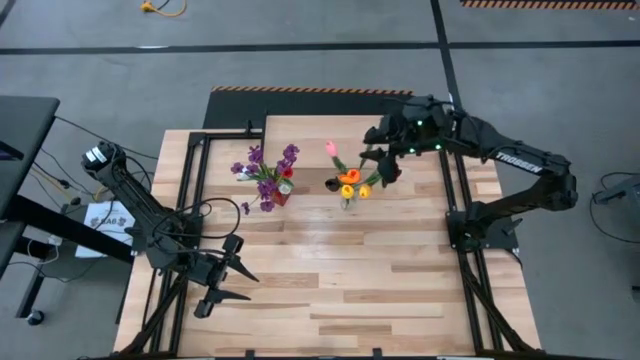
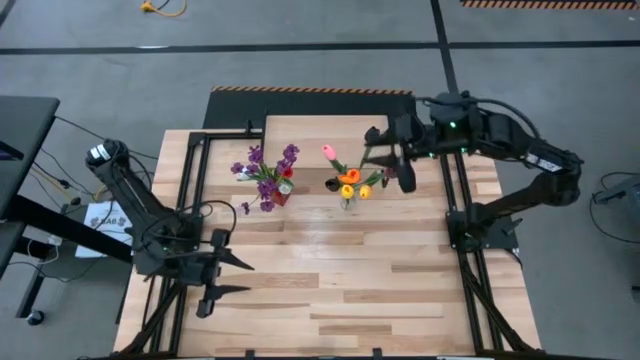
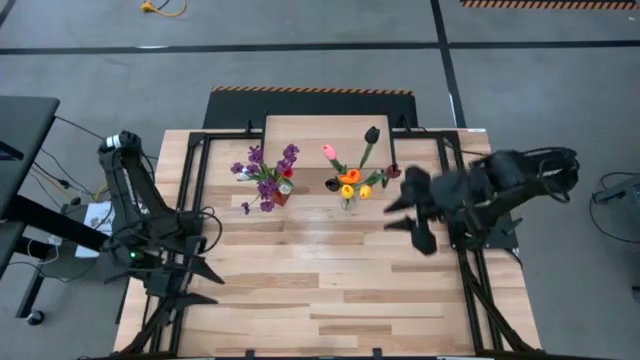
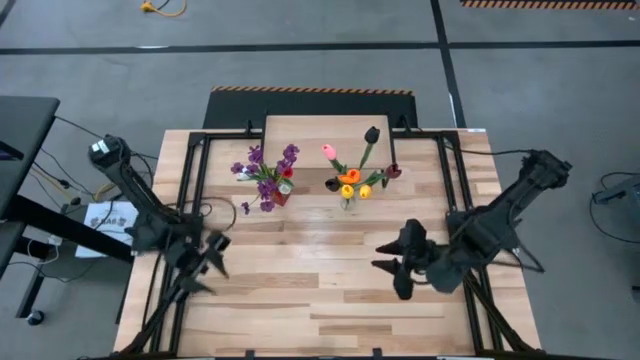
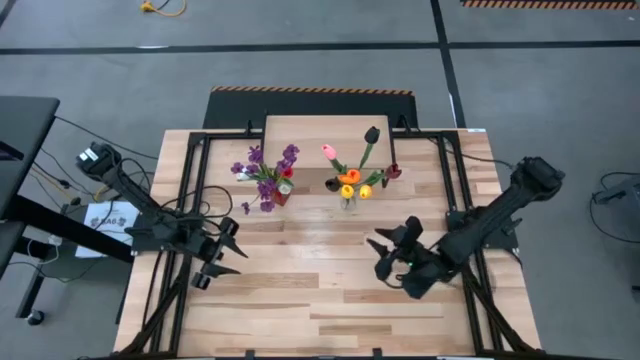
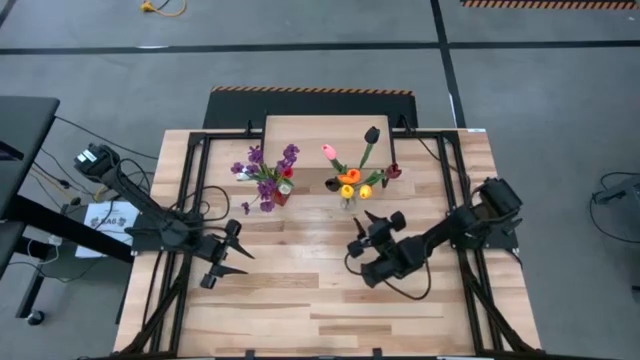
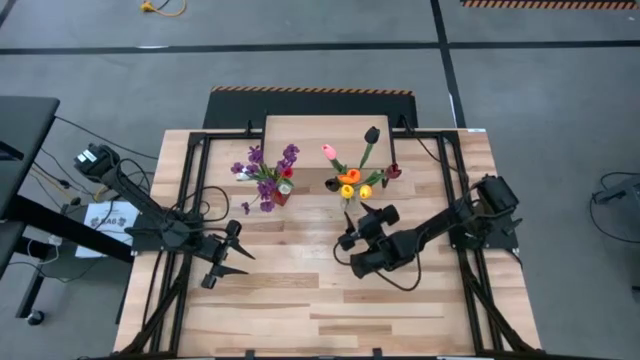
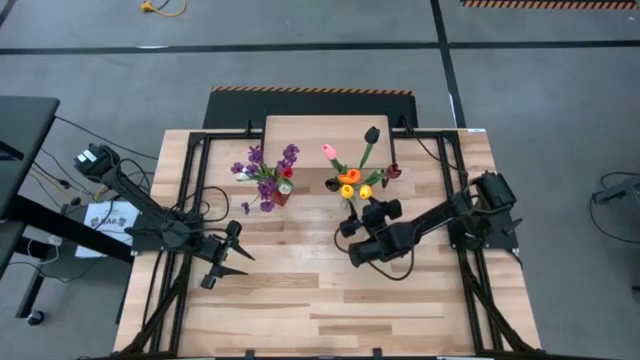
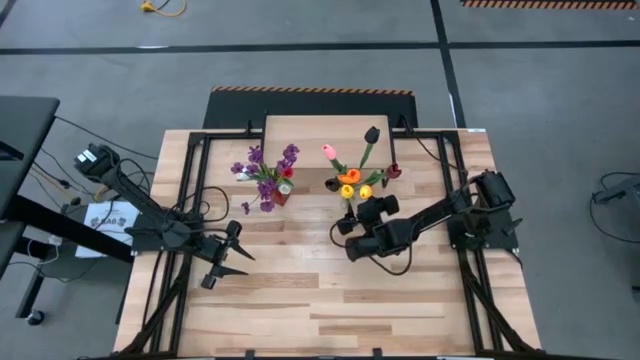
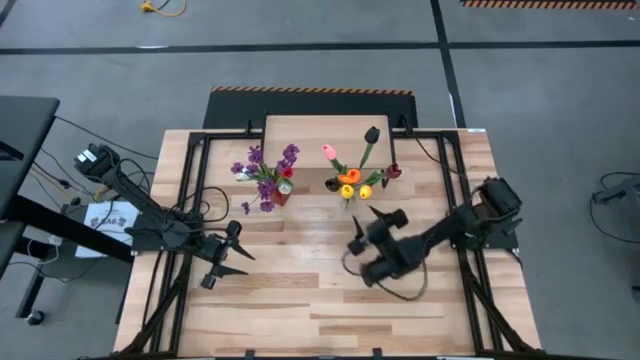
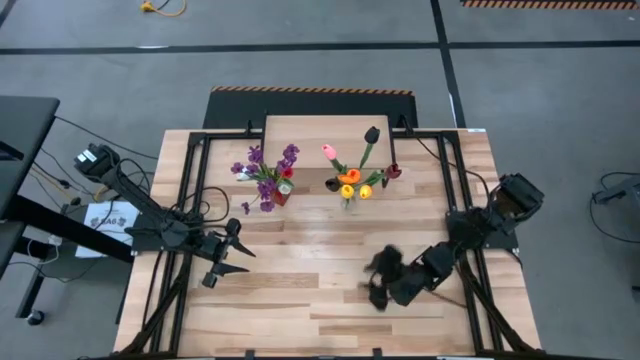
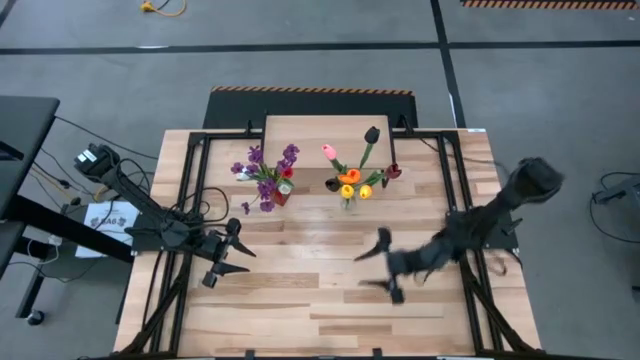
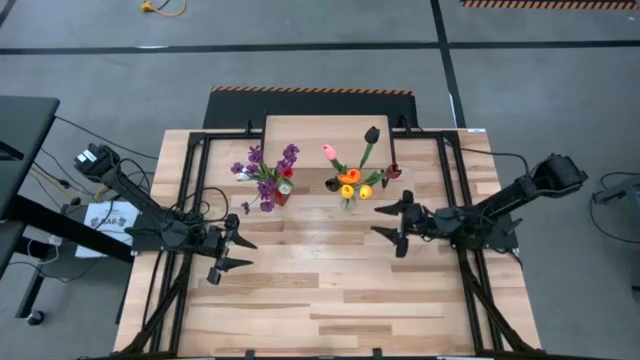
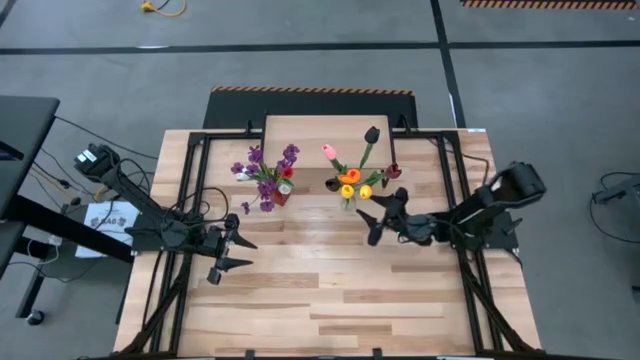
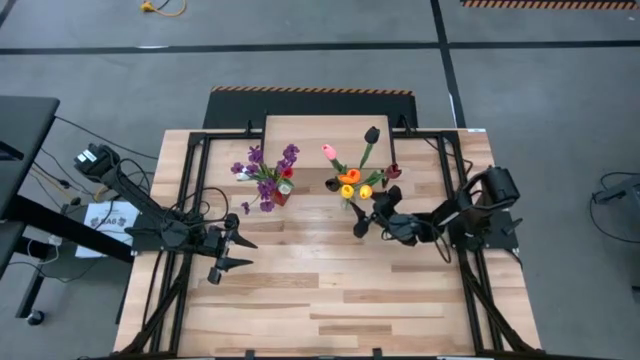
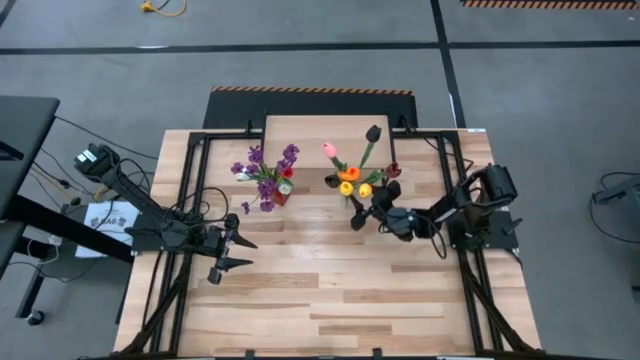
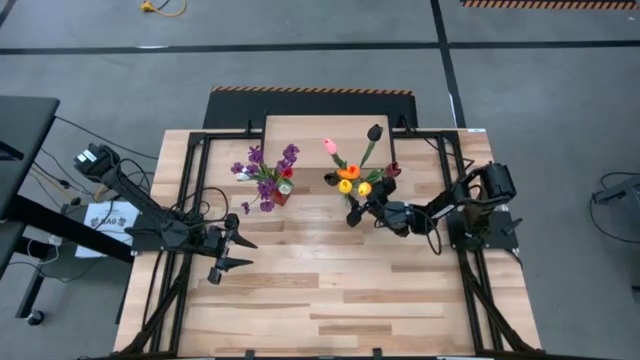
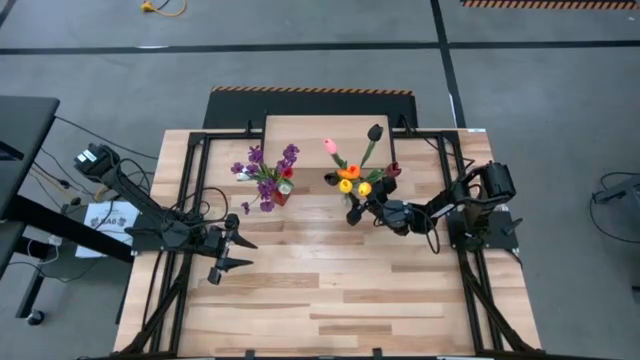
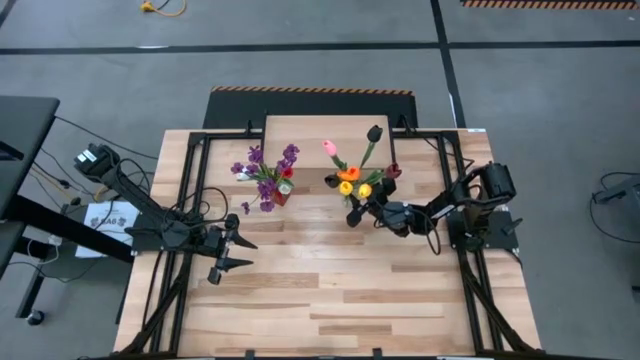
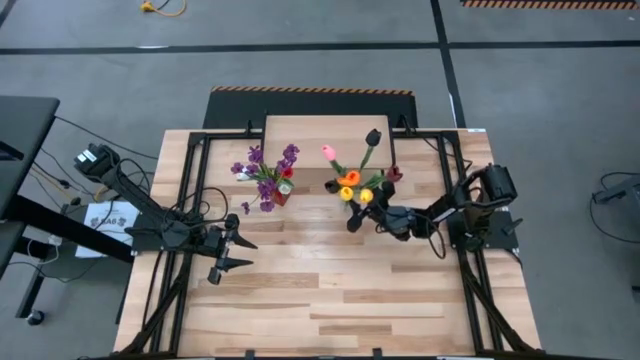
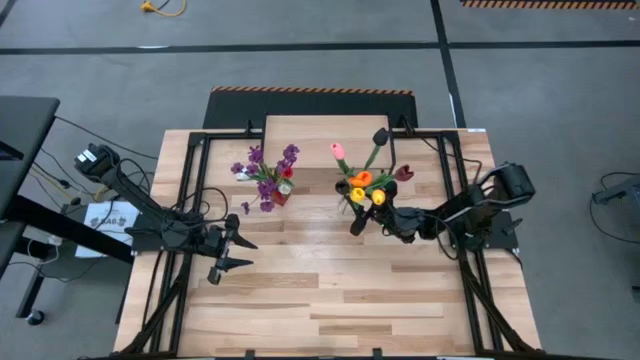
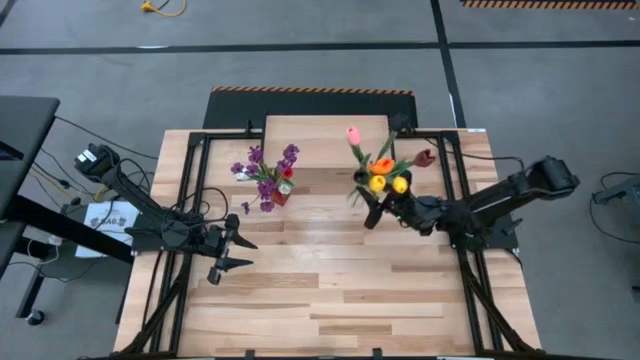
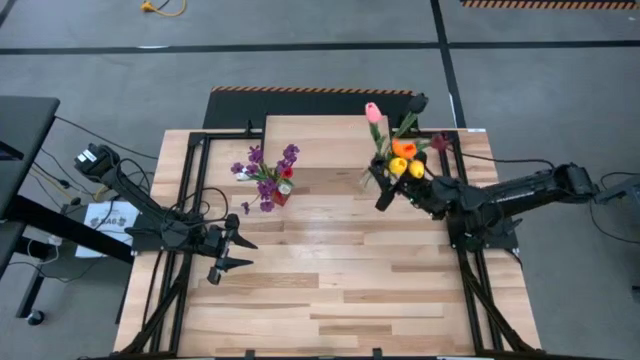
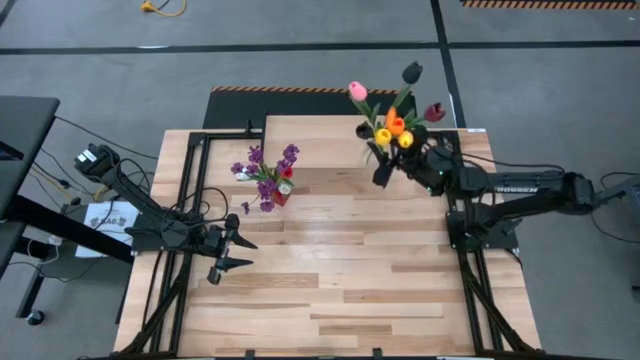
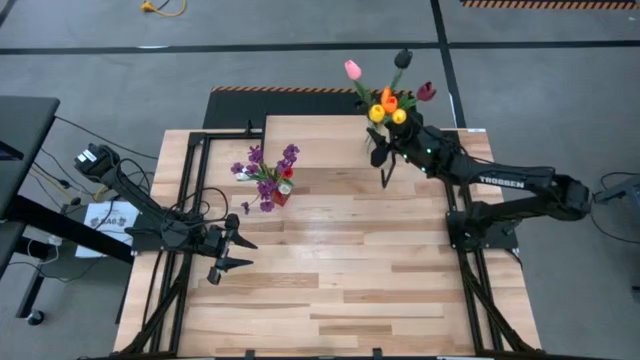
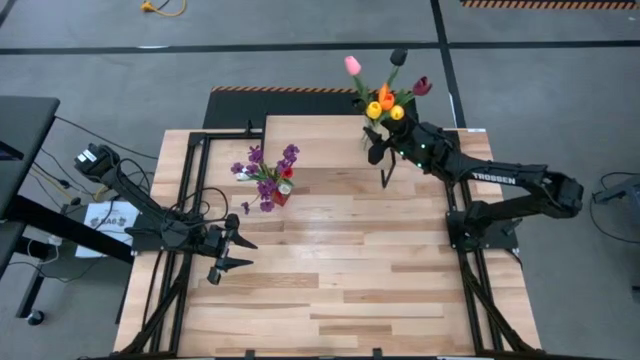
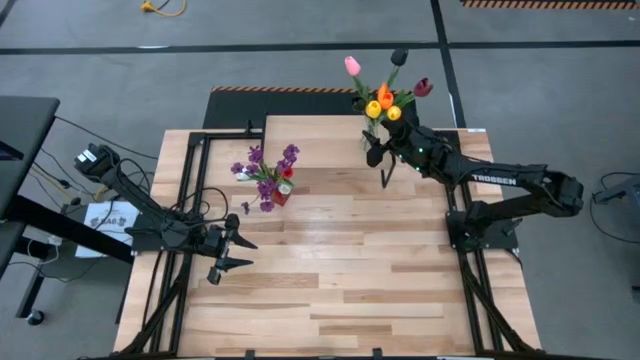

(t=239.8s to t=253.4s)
Task: Pick and place flowers into a vace then onto a shelf
Put the transparent flower vase on the shelf

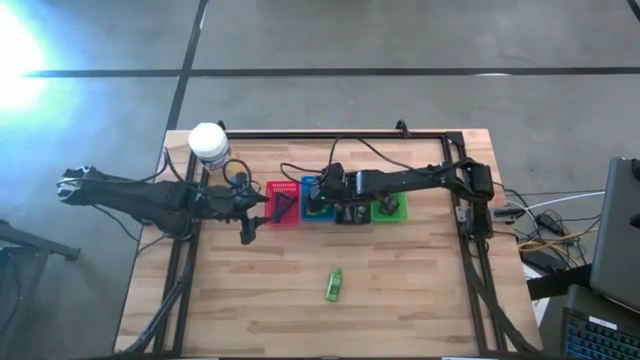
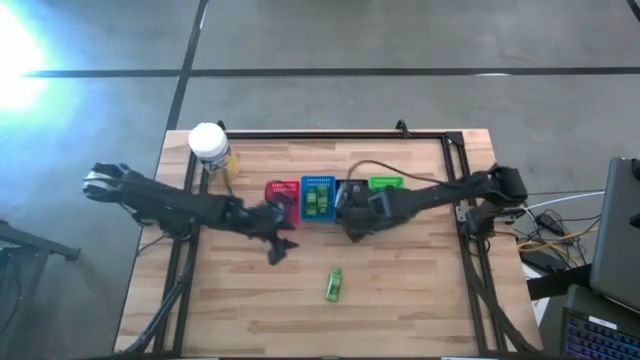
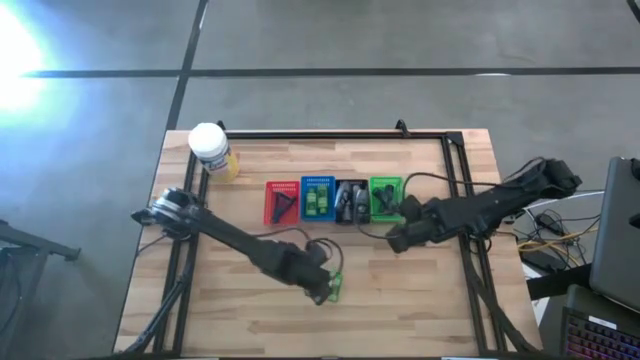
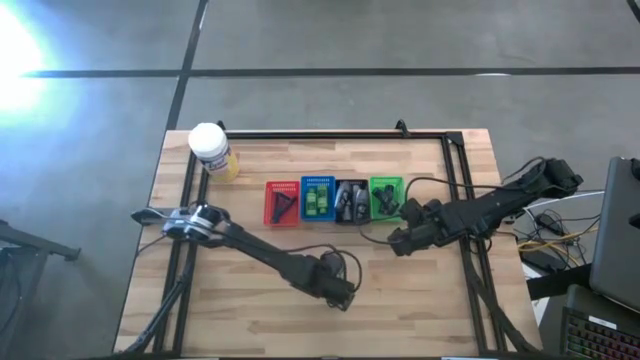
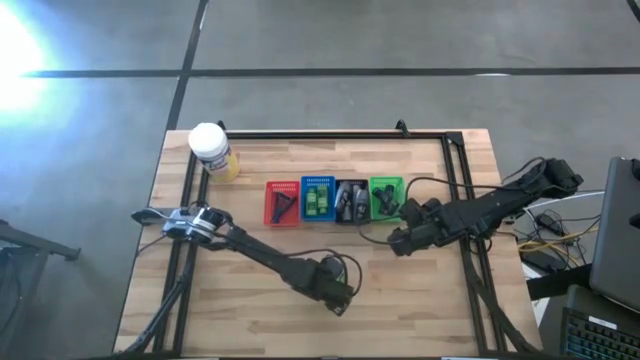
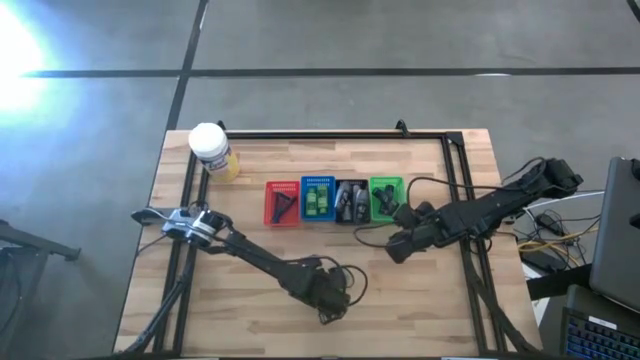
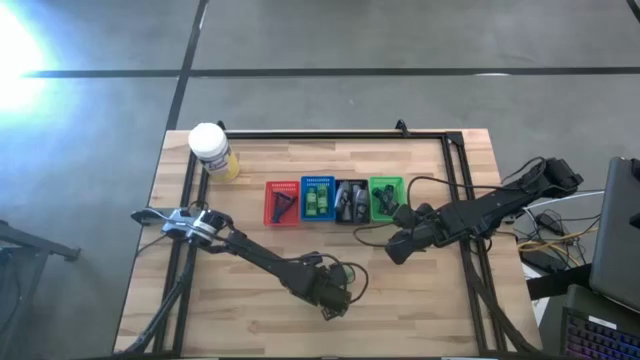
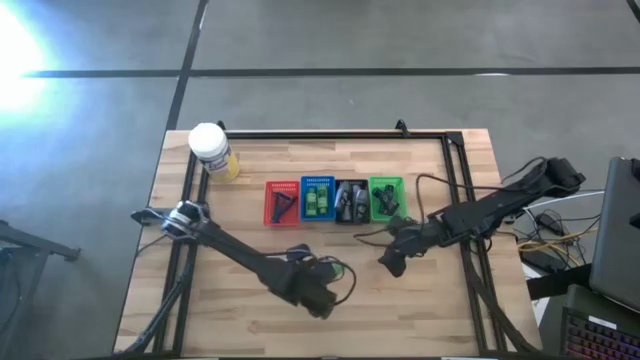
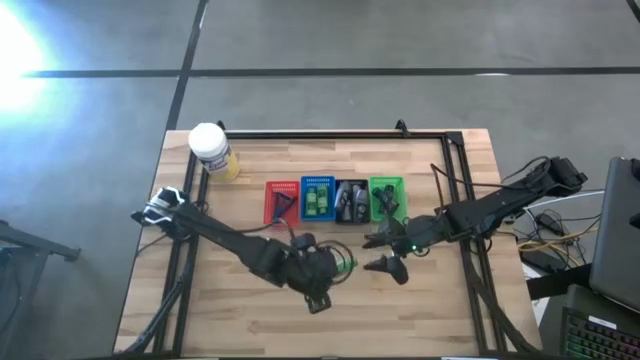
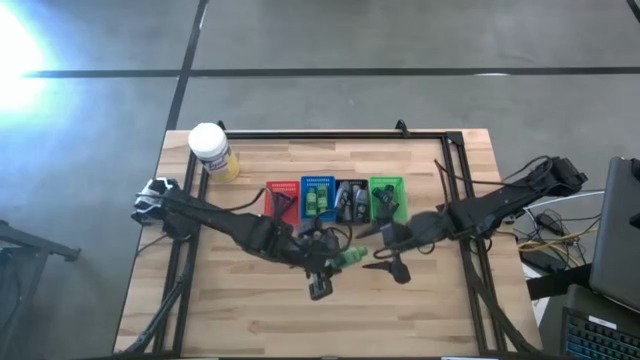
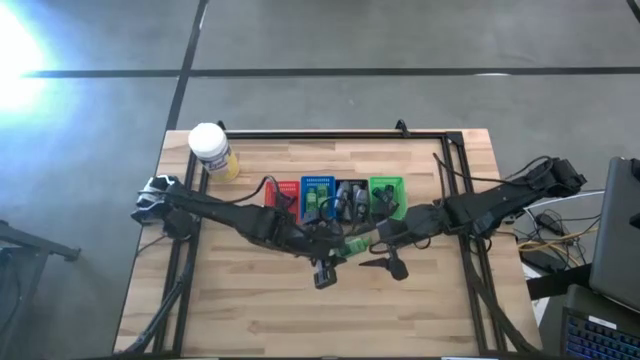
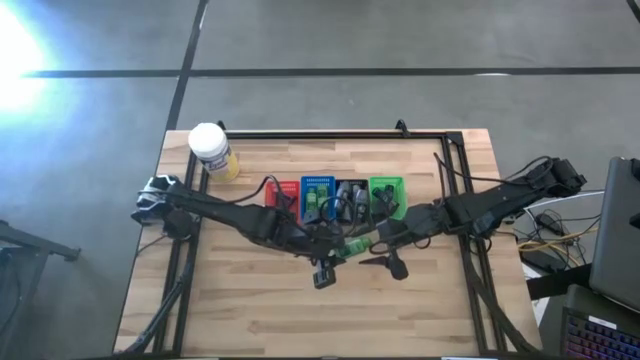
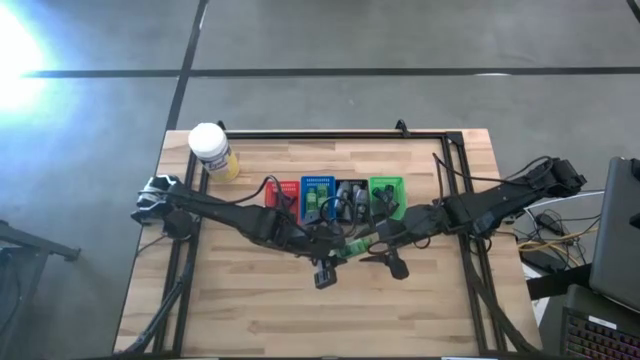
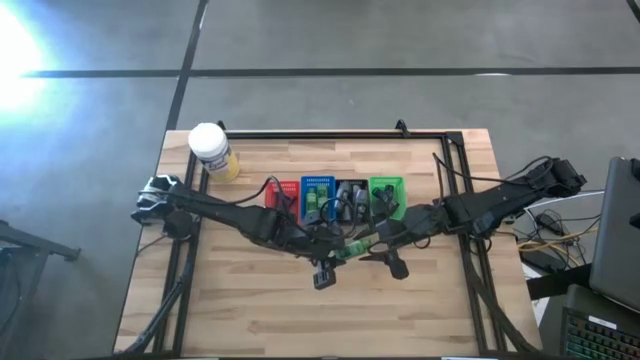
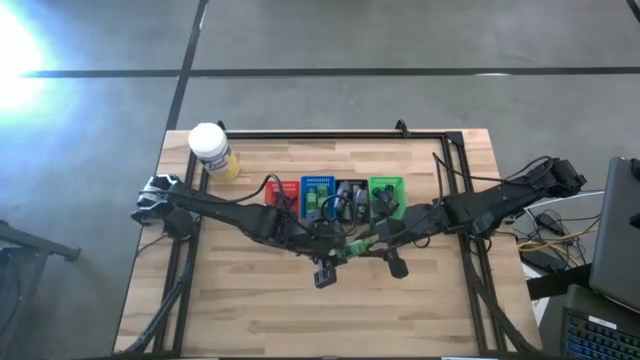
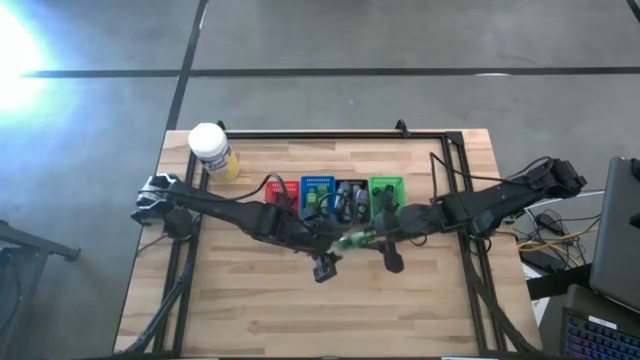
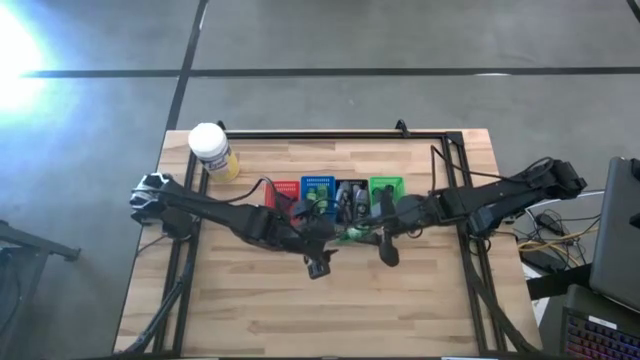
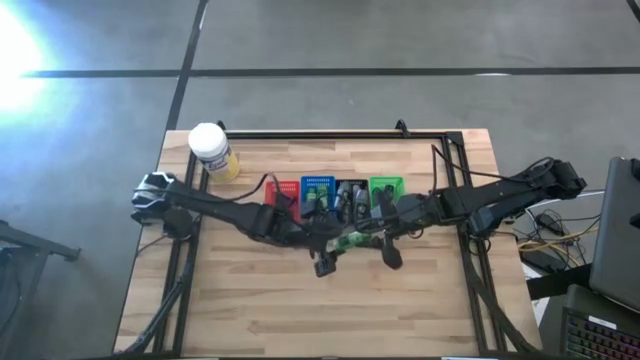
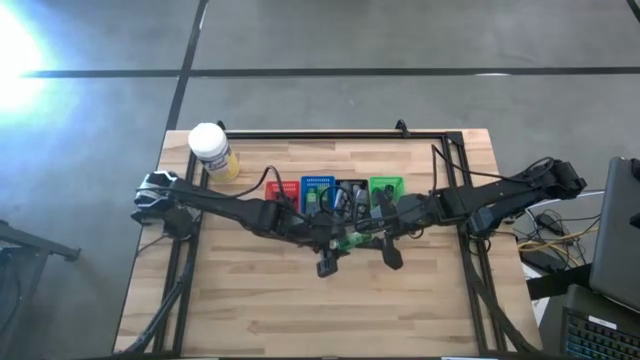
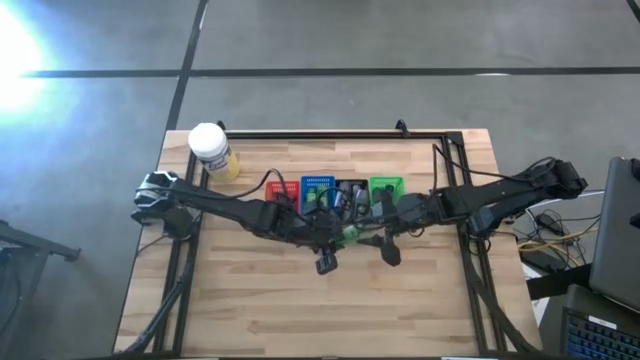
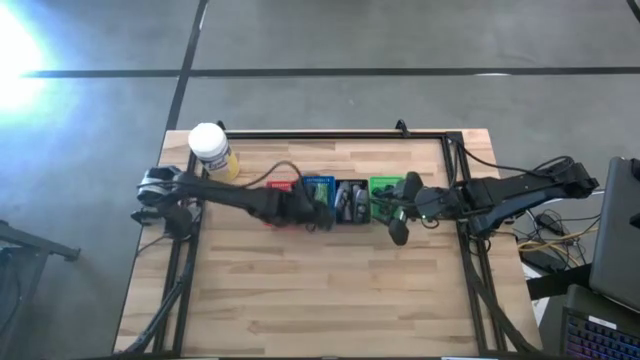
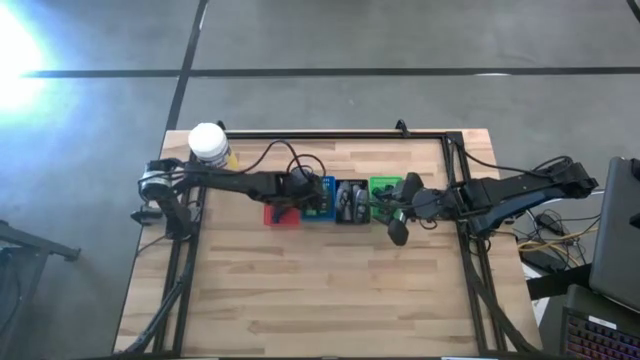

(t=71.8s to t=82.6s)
Task: Pick & Place Travel size toiletries
Put the green shampoo into the blue bin
